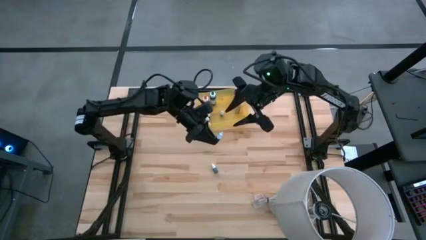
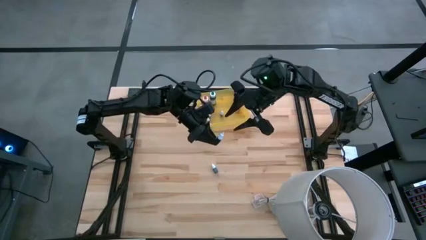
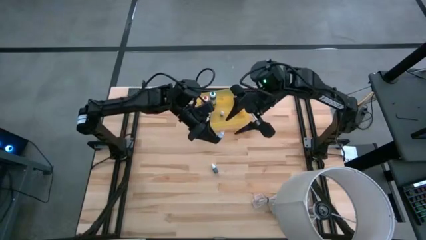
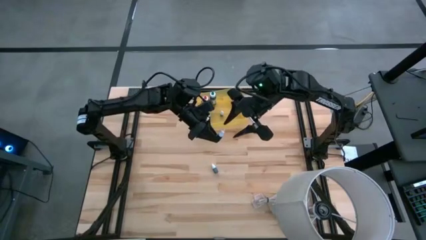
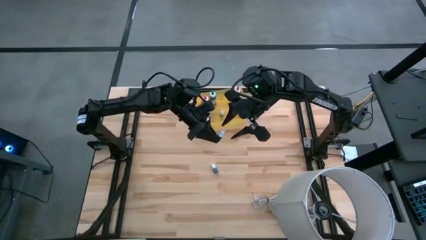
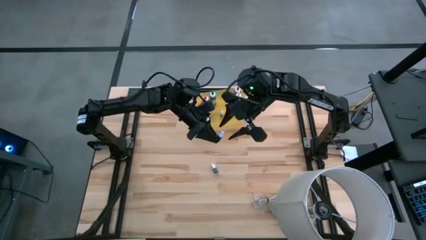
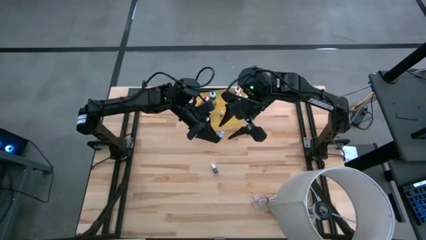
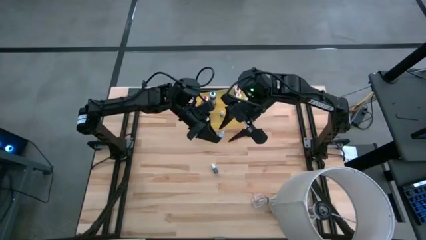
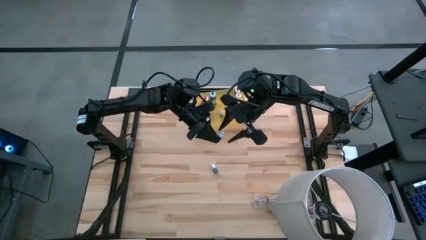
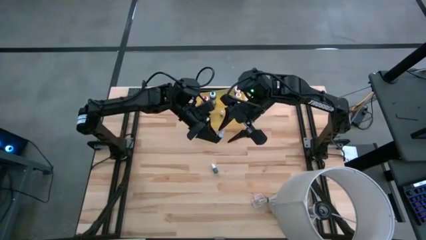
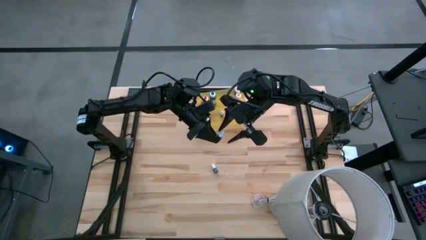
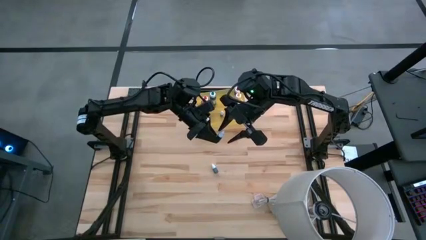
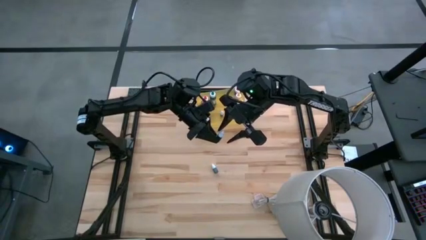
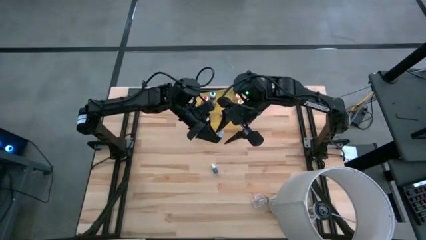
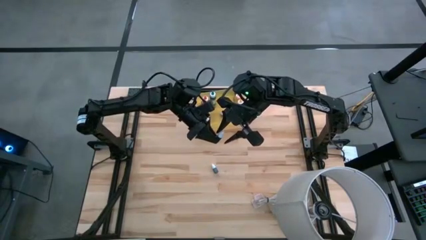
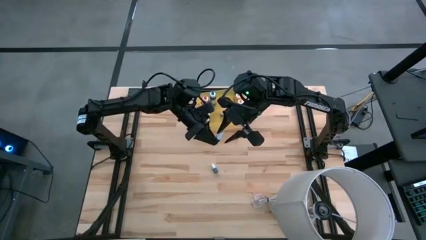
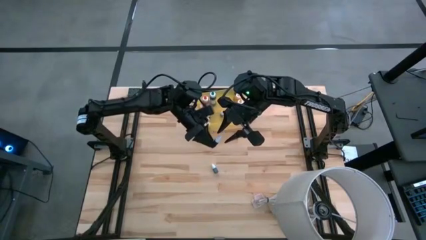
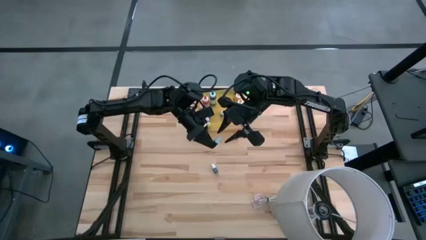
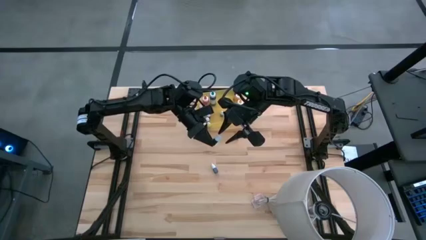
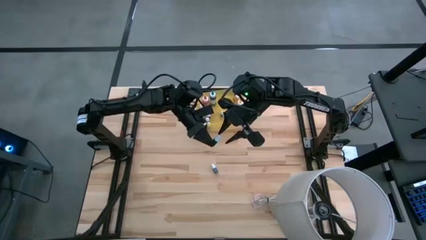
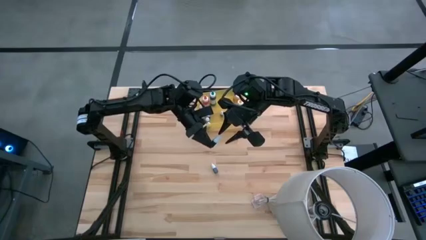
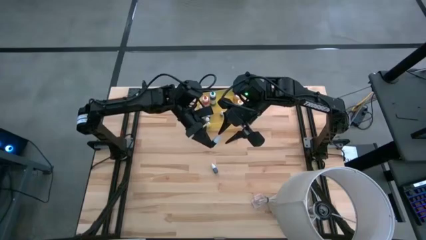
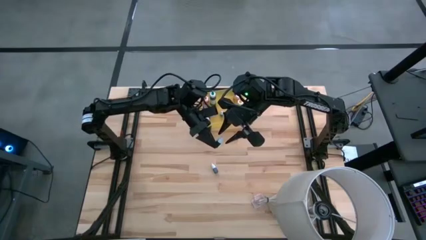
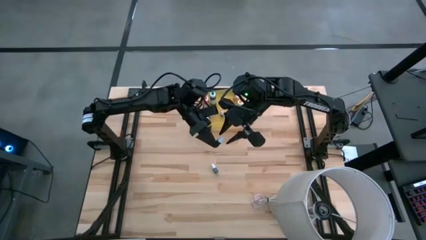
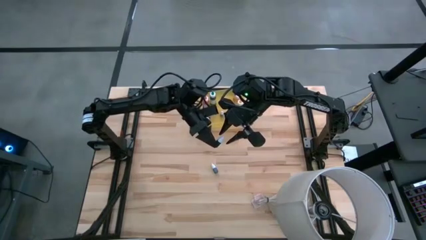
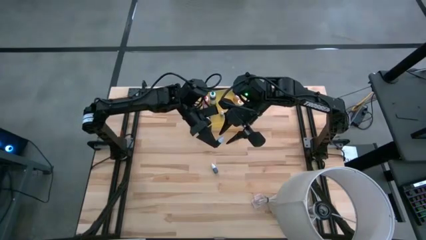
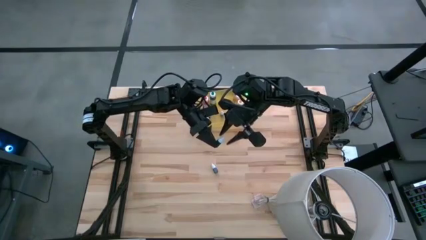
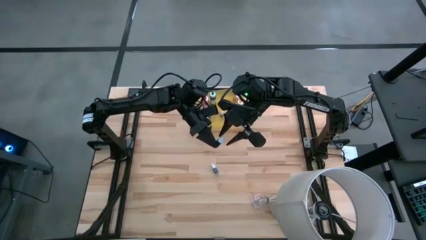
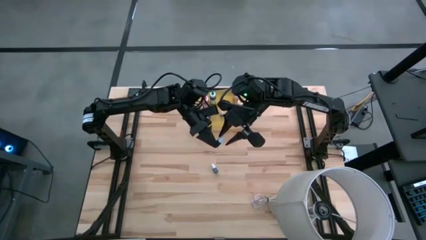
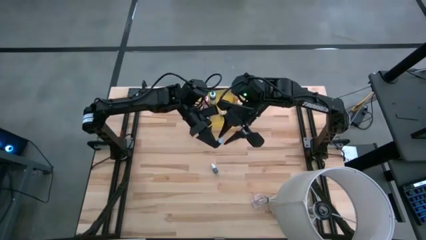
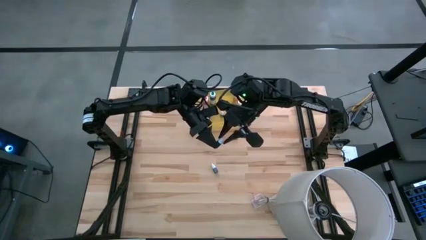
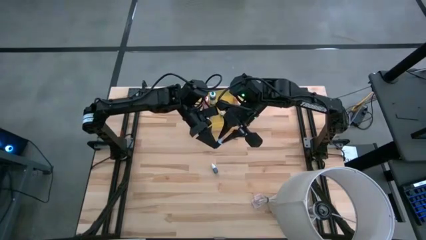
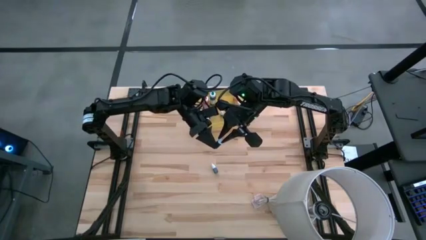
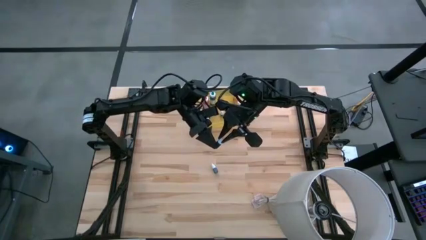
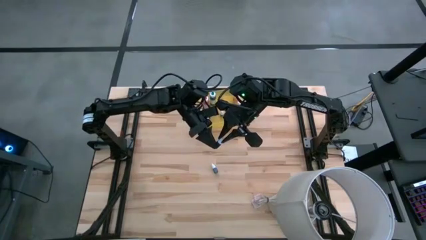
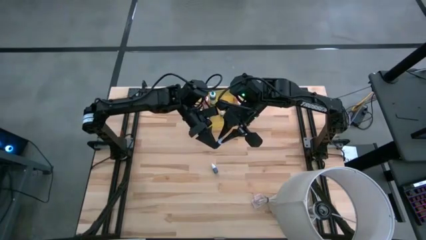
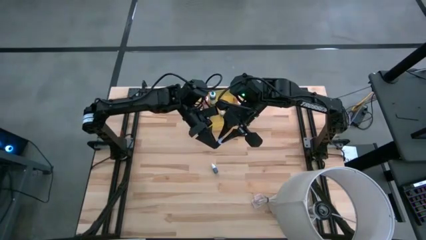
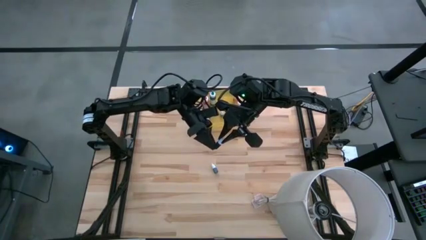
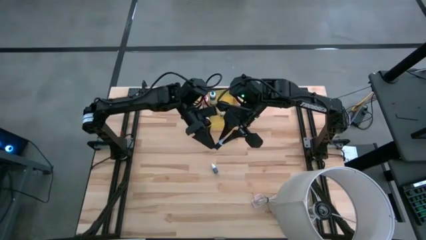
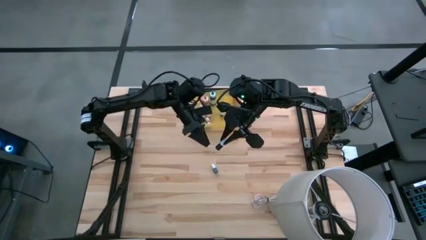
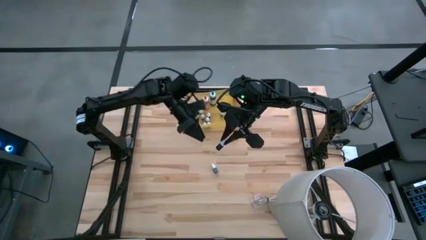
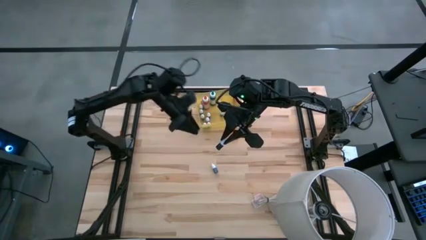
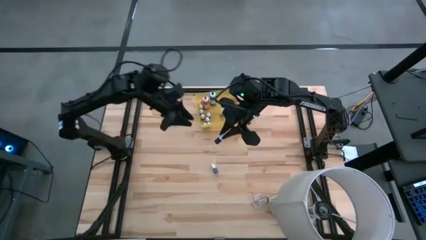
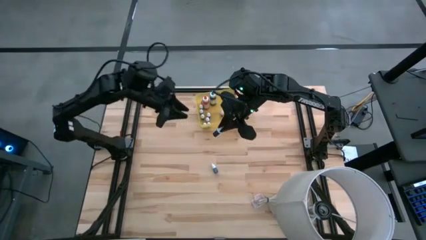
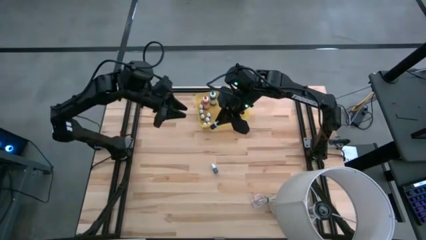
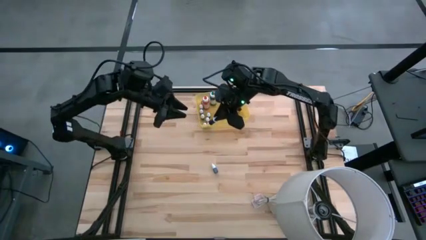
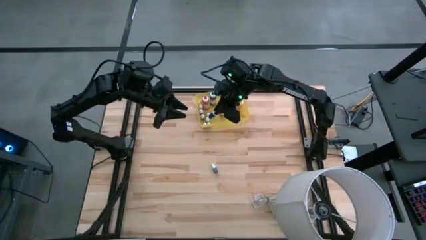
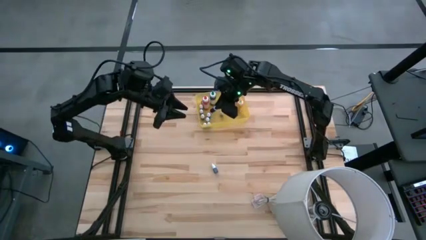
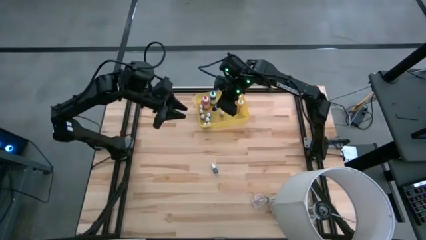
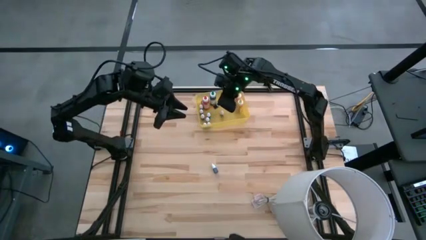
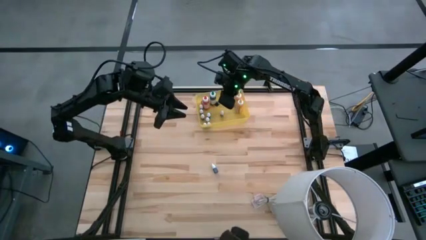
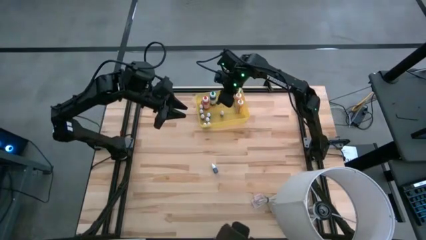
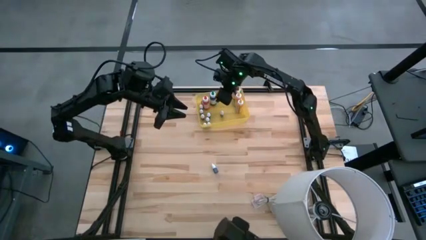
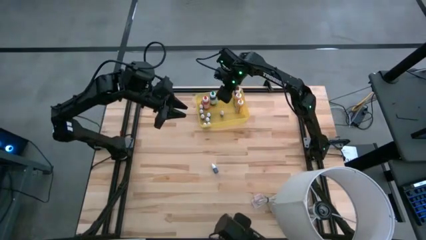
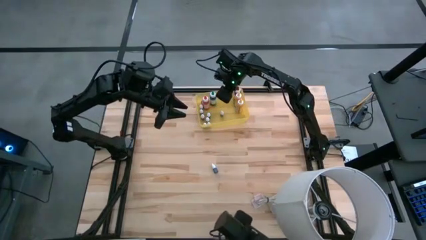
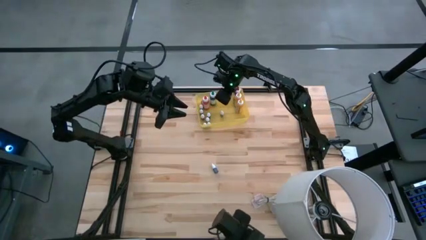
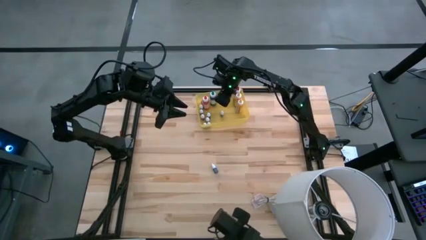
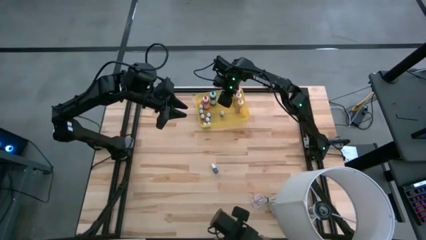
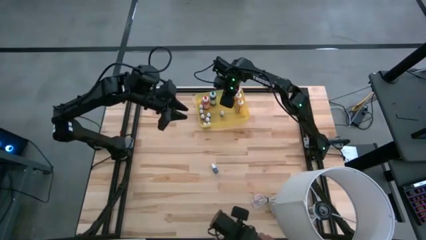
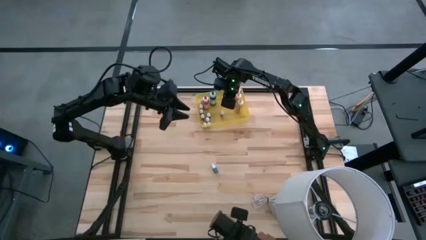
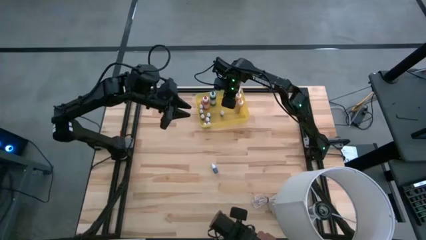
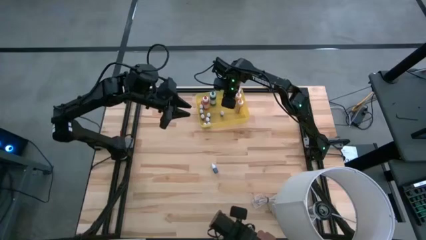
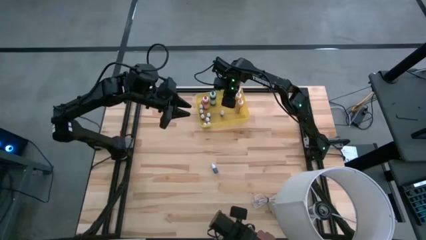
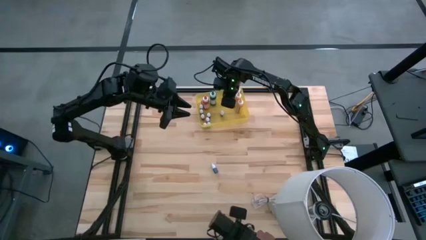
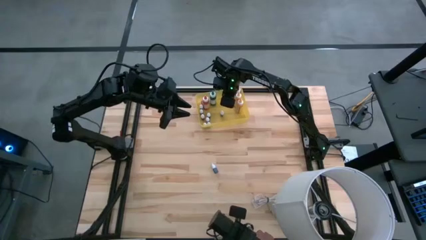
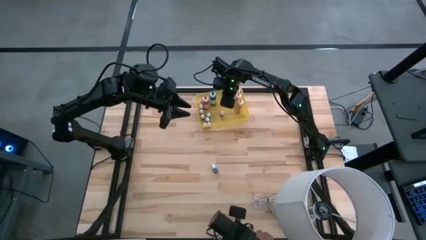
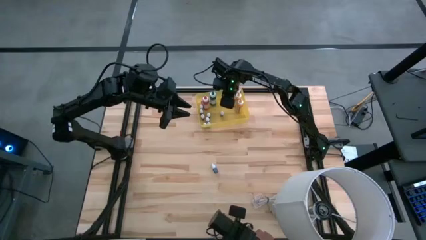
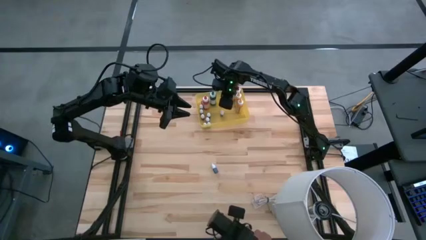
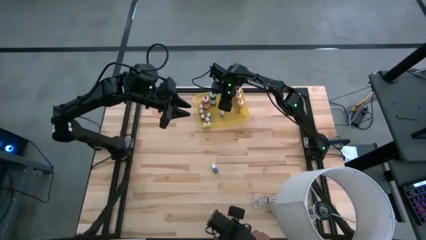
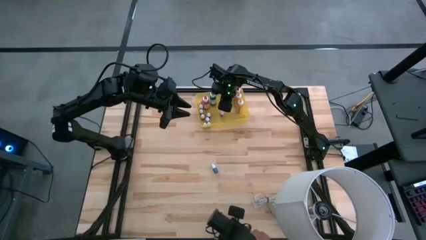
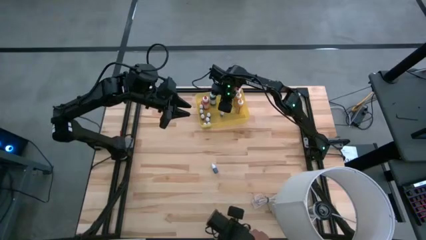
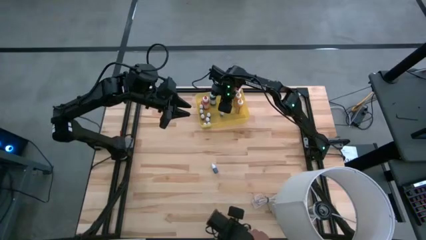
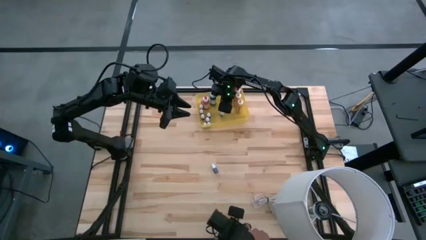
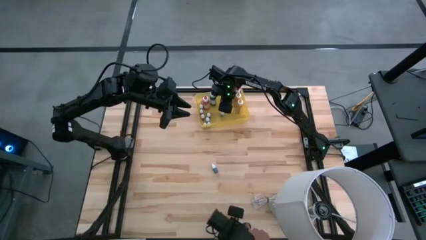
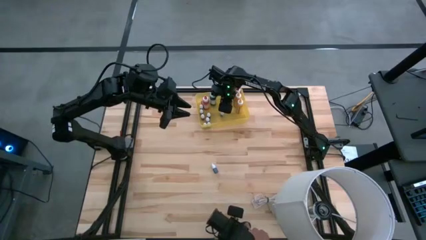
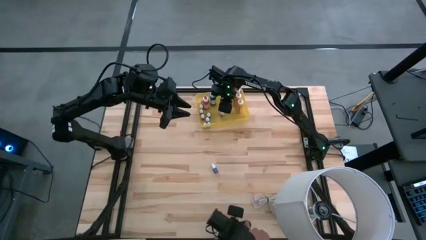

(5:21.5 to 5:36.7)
Task: Pick & Place food coloring
Put the small black food coloring bottle into the yellow bin
